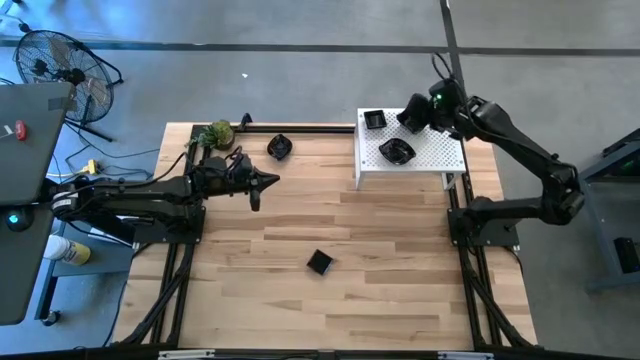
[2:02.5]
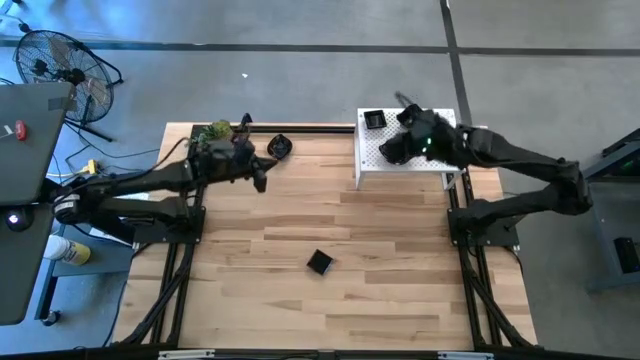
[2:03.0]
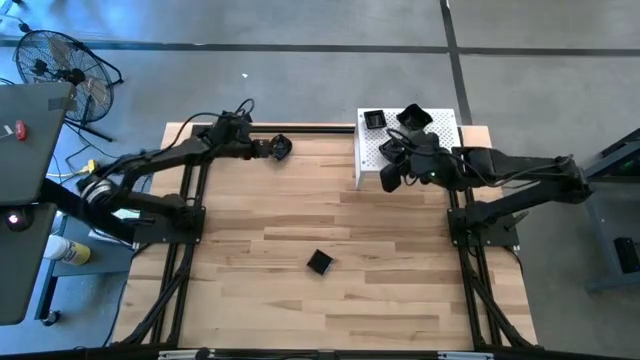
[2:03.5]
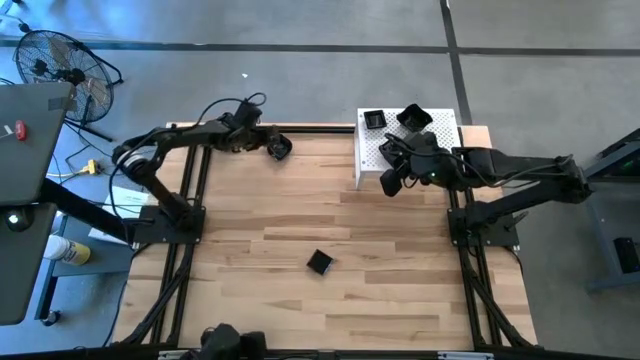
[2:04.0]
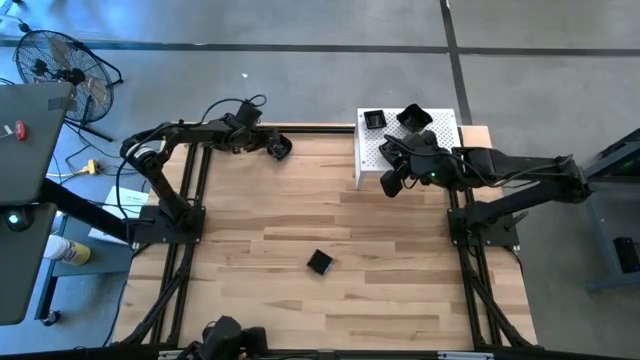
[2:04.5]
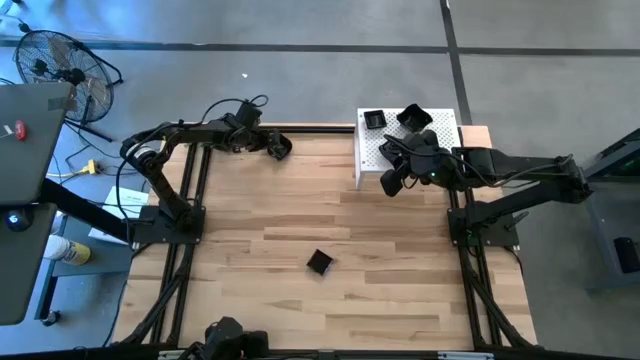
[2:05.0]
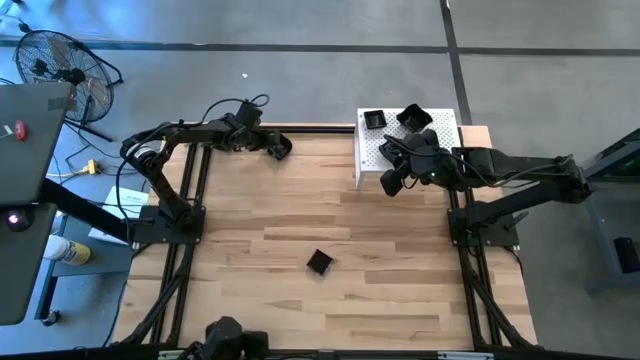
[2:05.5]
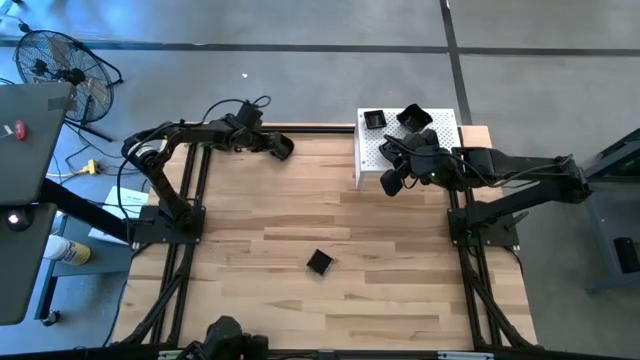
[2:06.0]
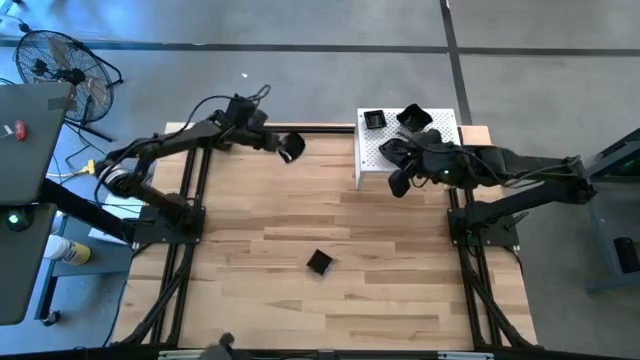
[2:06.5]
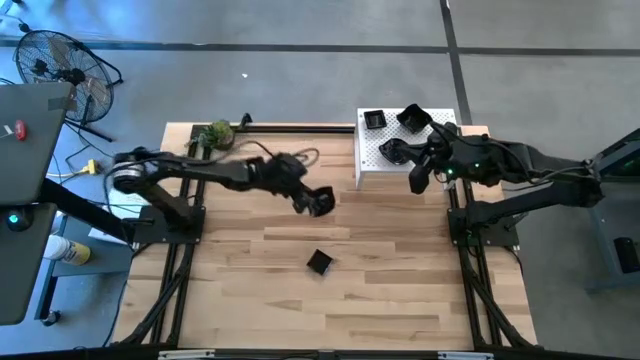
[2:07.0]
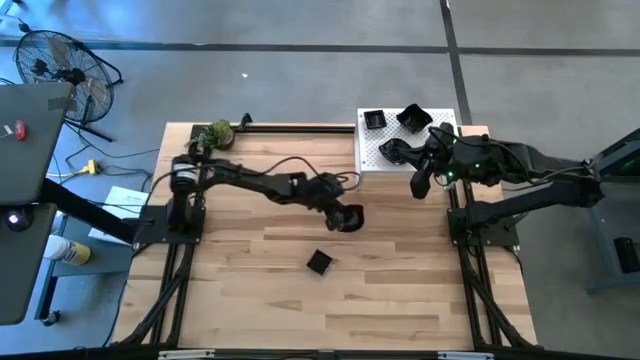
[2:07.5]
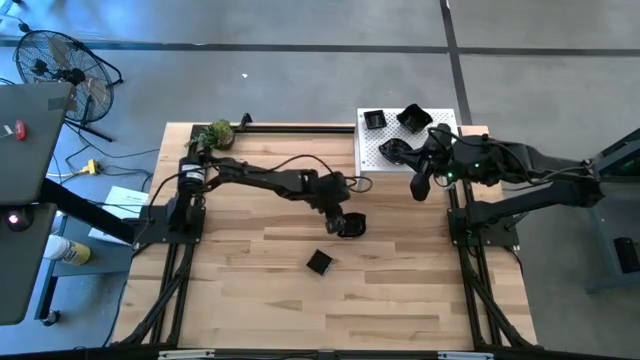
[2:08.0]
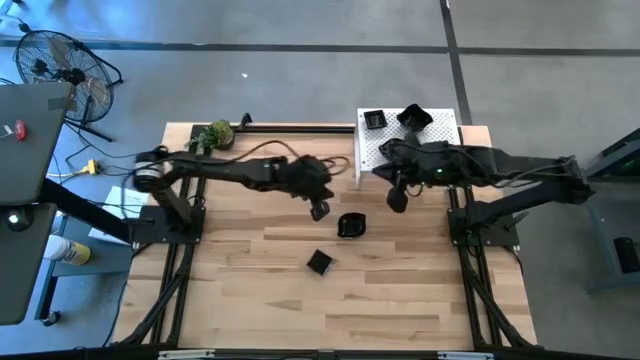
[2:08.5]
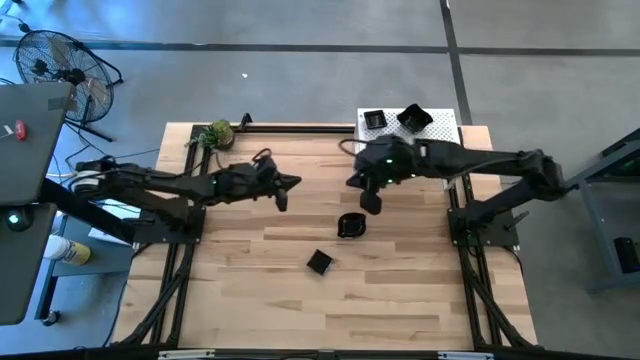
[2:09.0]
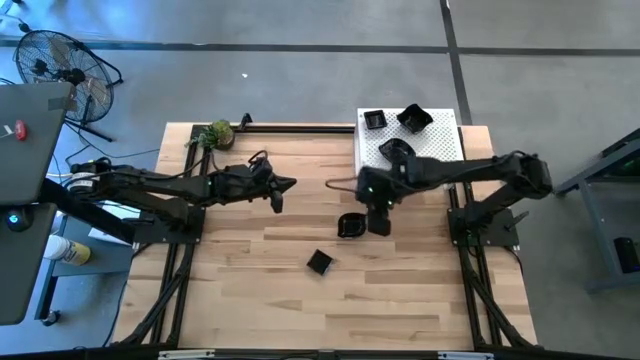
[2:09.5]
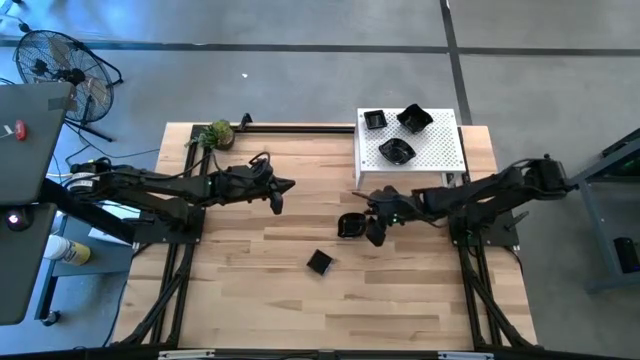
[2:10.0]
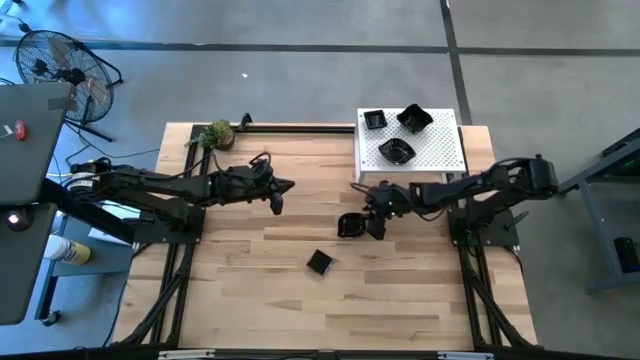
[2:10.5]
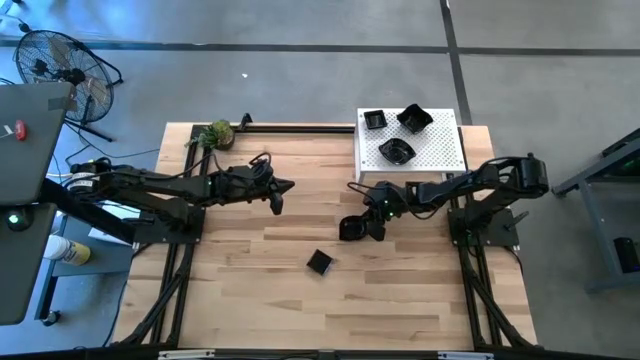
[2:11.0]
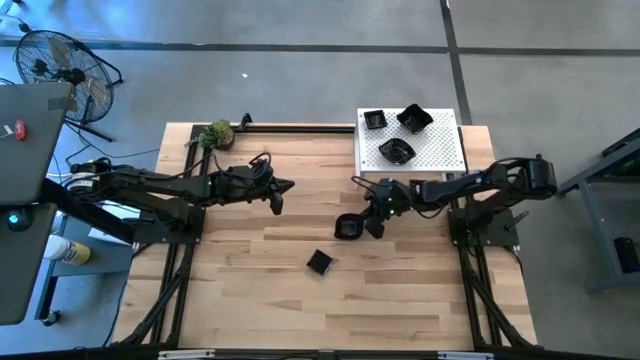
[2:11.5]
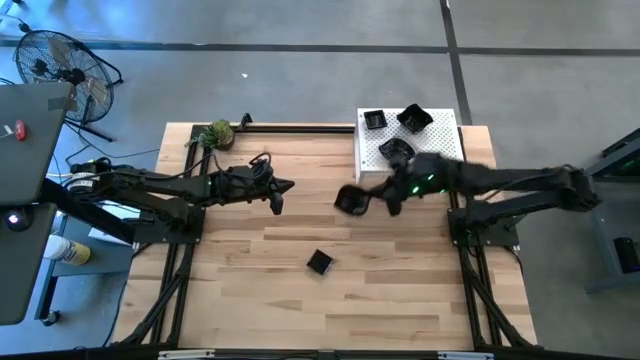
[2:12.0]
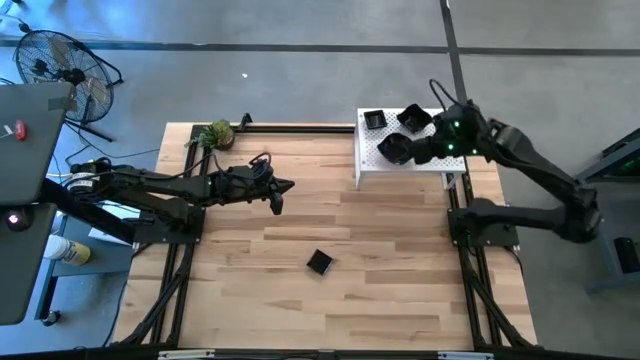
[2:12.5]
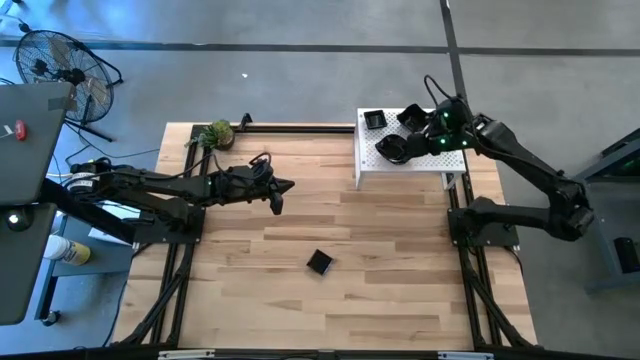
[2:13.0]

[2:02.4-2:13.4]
Task: Pick & Place Mini shaped plates
Stack the leaf-shaped plate on top of the stacked leaf-shaped plates on the shelf

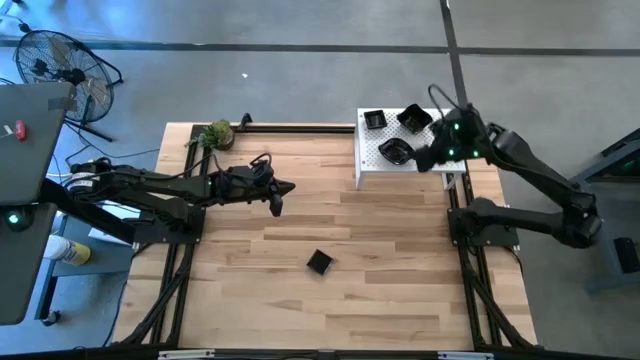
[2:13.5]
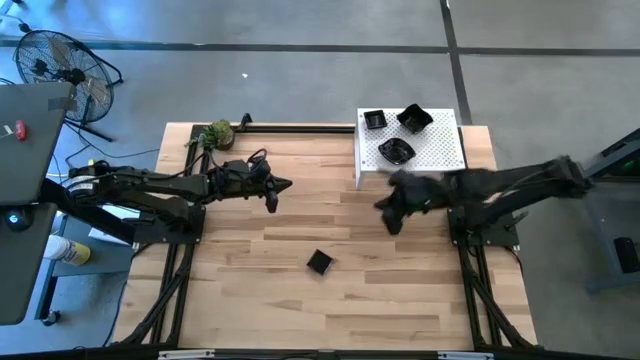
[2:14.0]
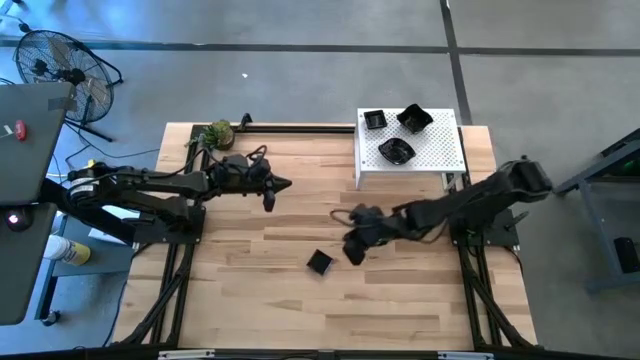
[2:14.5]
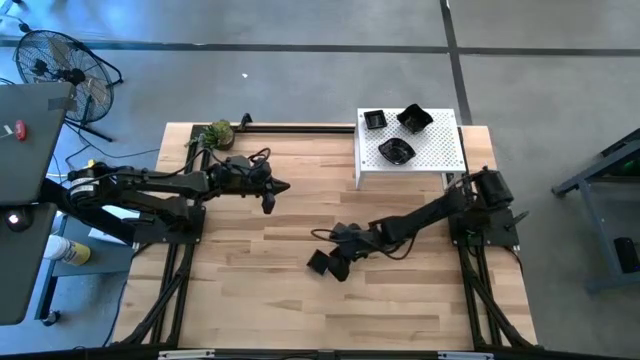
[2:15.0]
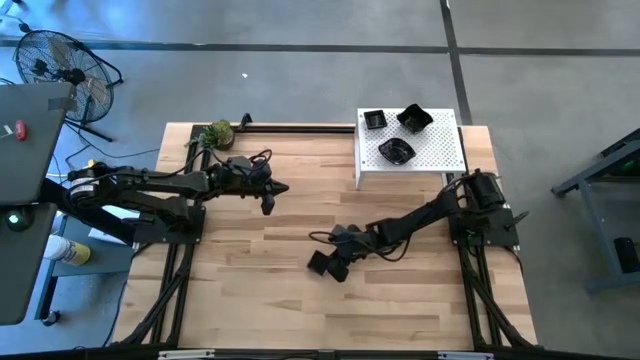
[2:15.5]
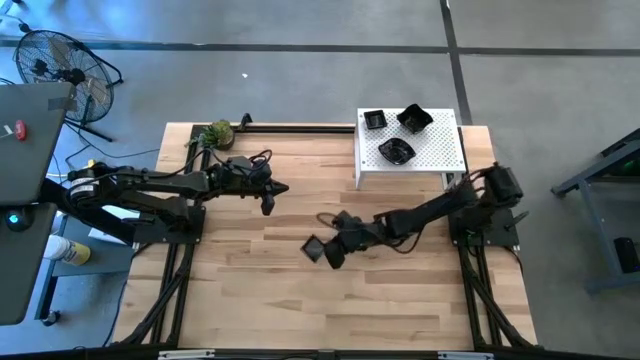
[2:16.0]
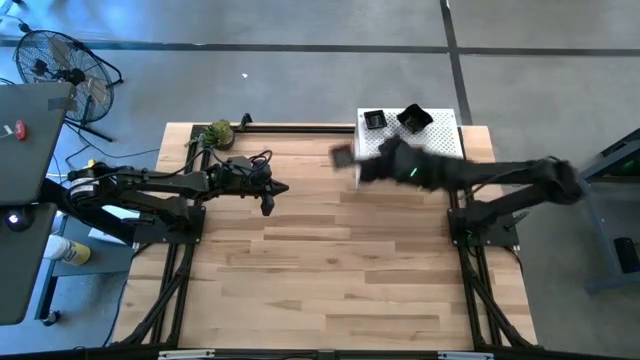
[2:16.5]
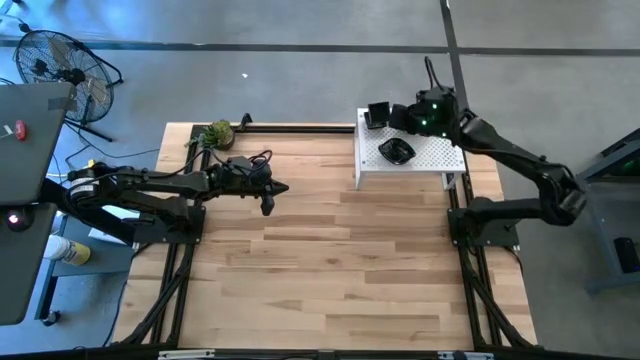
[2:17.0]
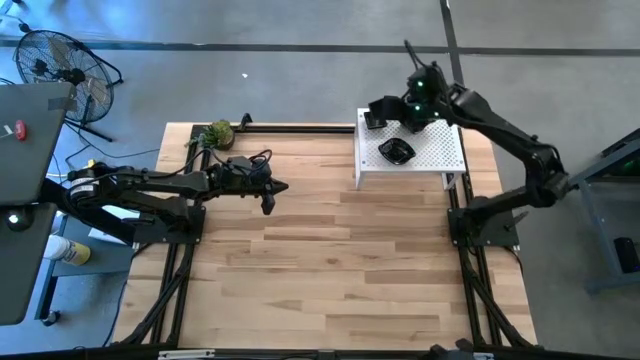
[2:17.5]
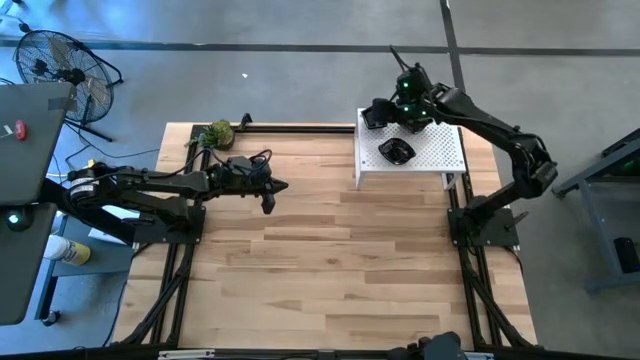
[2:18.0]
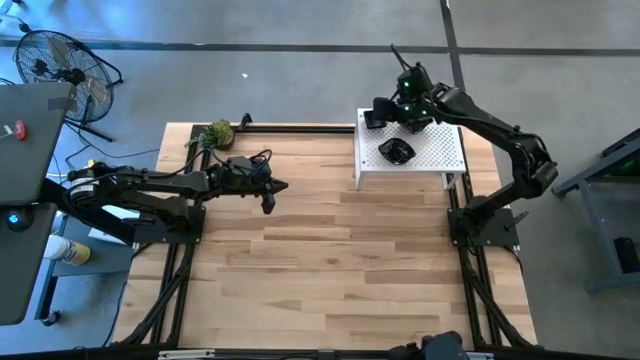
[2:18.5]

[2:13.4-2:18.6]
Stack the square plate on top of the stacked square plates on the shelf

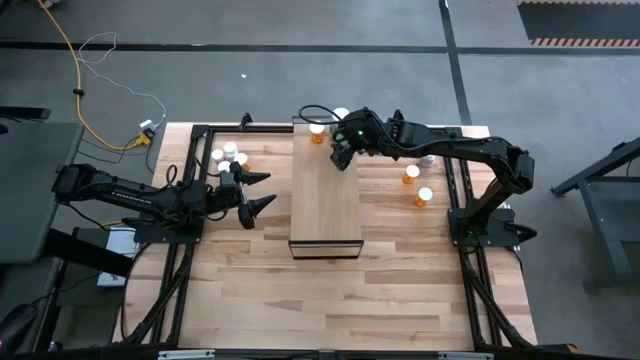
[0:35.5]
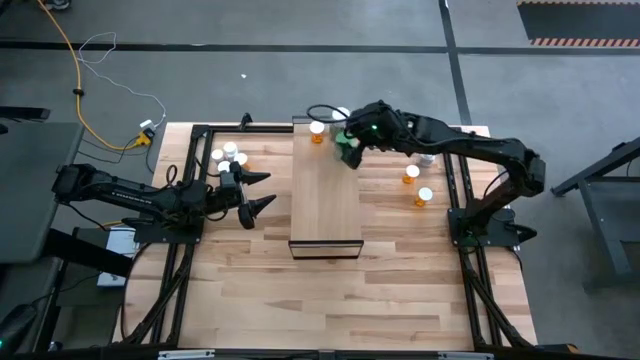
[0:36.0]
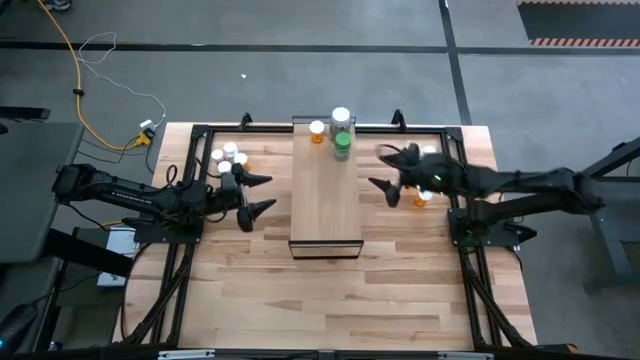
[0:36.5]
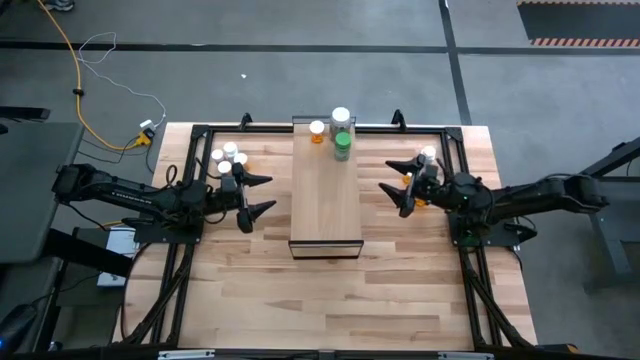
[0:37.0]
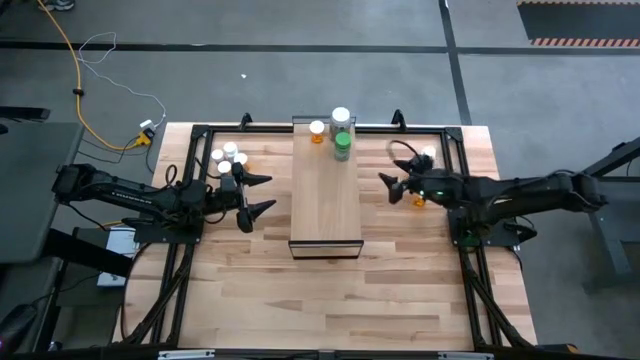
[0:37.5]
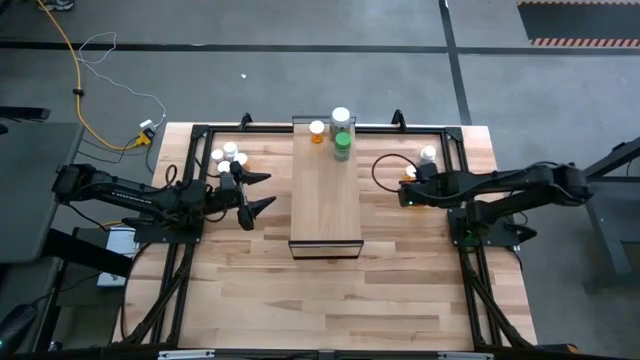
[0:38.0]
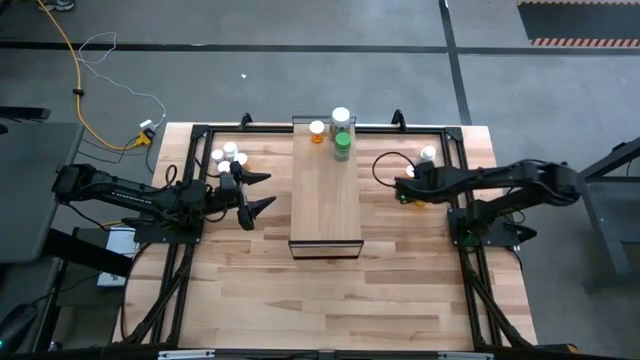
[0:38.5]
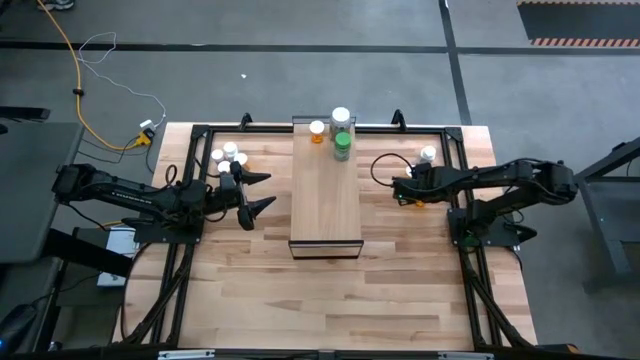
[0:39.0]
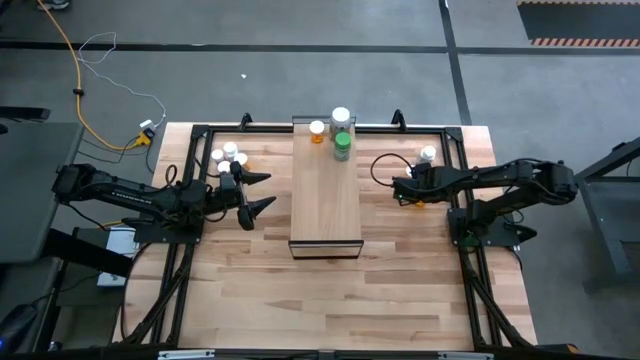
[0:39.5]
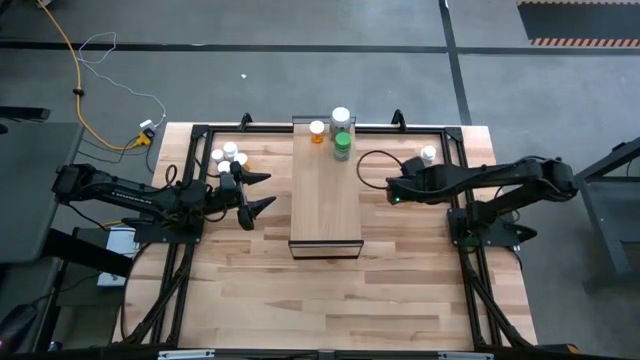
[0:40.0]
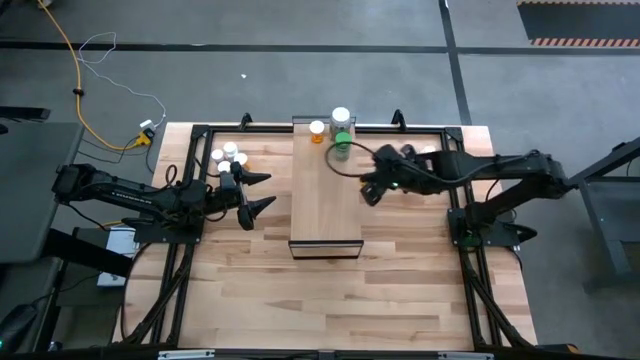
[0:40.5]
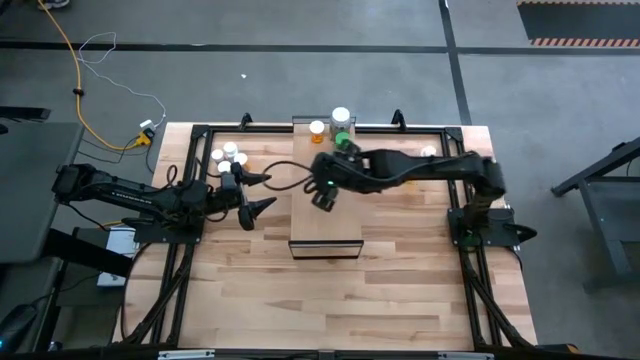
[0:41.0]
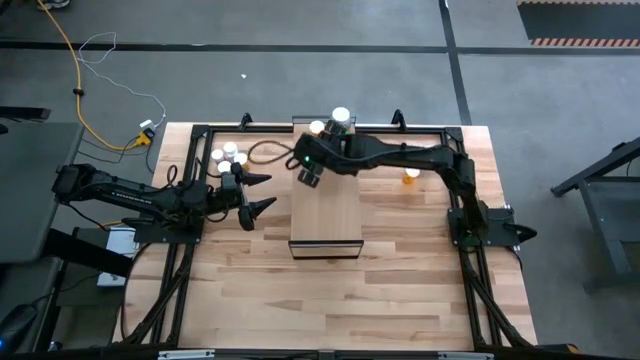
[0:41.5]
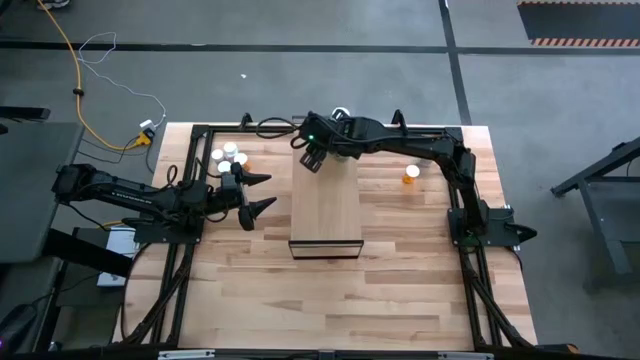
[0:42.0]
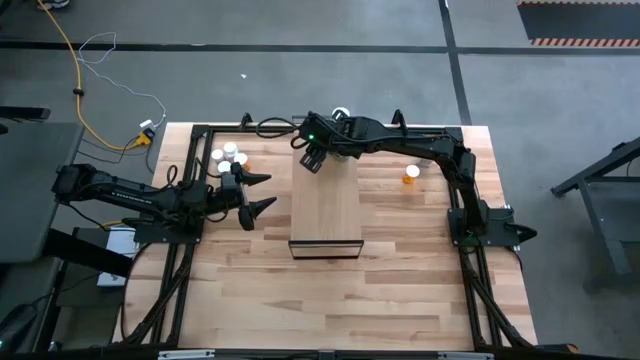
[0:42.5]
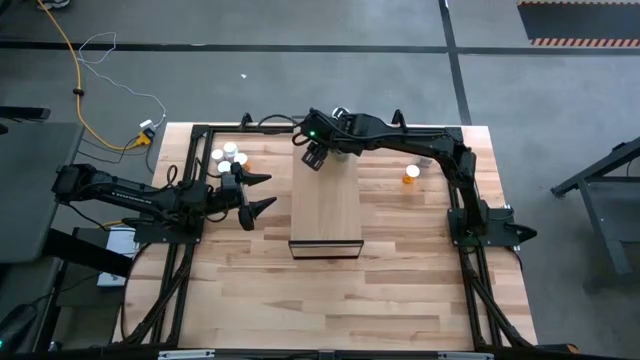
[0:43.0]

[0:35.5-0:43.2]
Task: Pick and place medicine bottles onto shelf by color
Put the bottom right yellow pill bottle on the shelf
